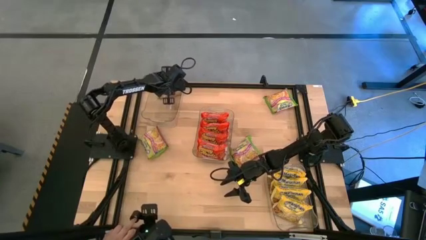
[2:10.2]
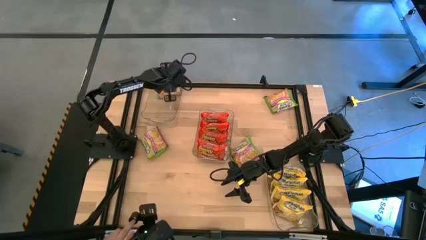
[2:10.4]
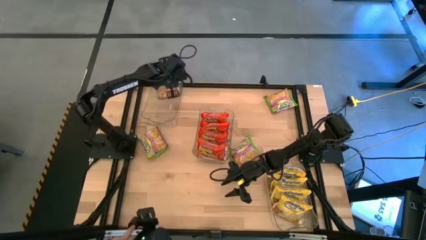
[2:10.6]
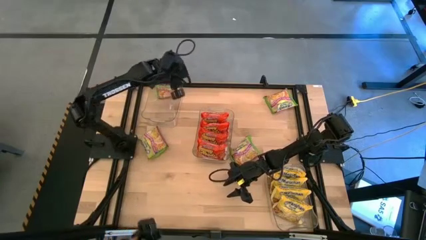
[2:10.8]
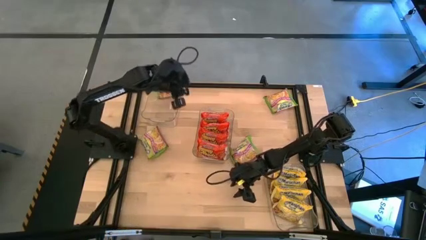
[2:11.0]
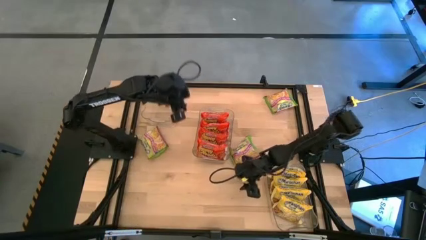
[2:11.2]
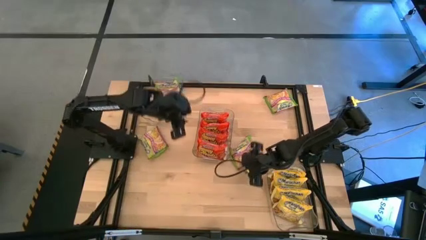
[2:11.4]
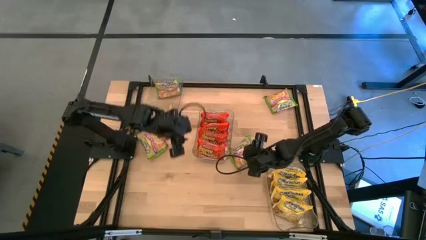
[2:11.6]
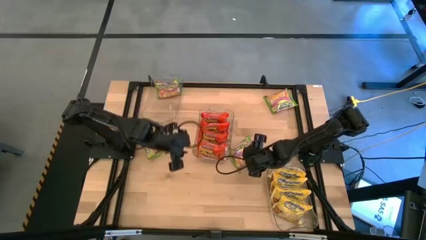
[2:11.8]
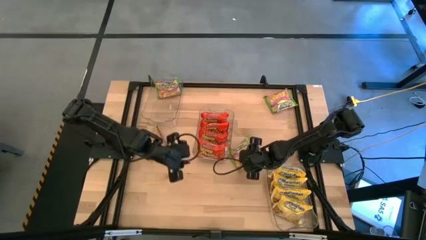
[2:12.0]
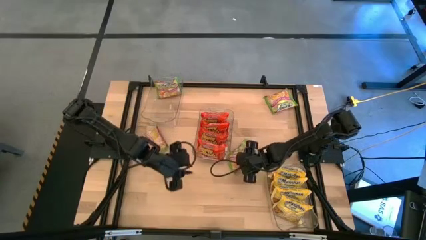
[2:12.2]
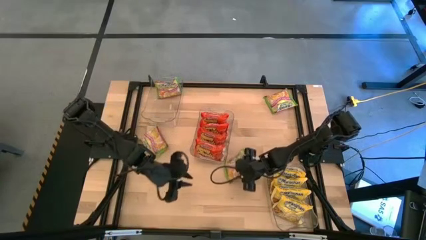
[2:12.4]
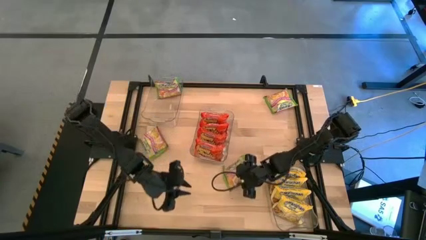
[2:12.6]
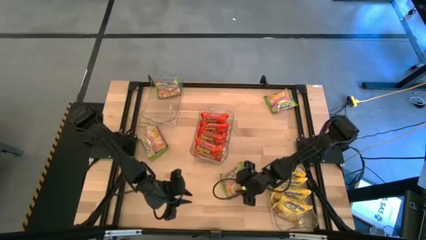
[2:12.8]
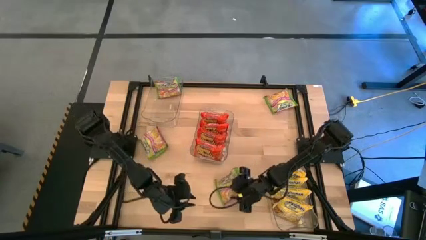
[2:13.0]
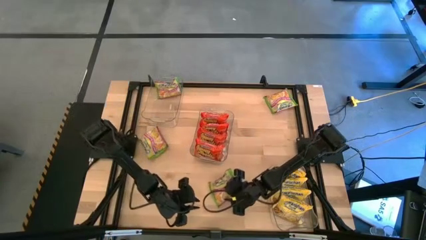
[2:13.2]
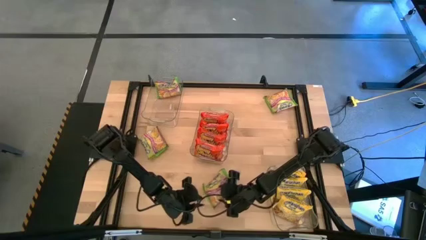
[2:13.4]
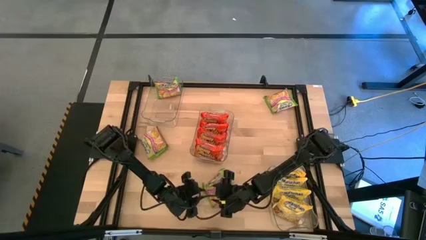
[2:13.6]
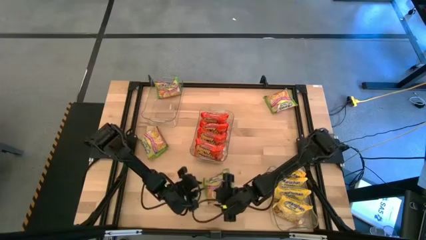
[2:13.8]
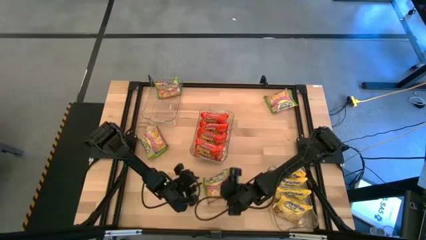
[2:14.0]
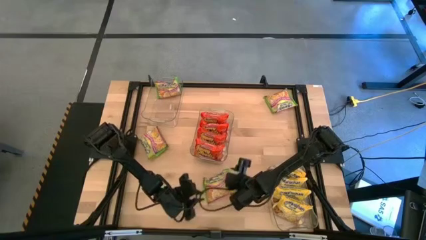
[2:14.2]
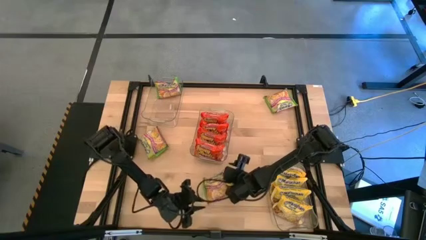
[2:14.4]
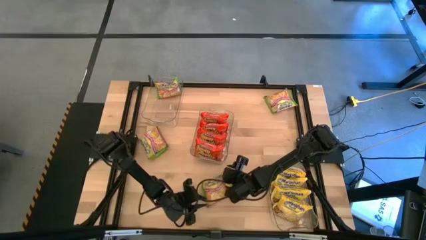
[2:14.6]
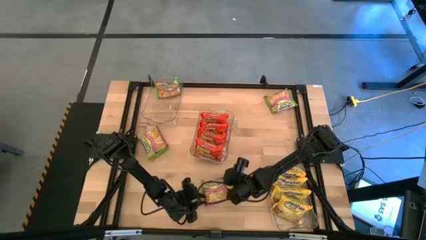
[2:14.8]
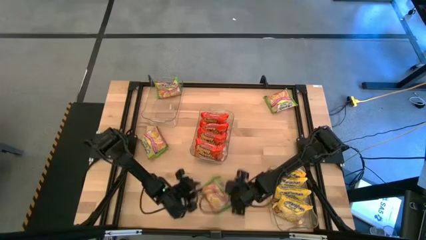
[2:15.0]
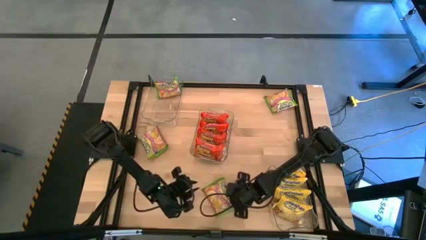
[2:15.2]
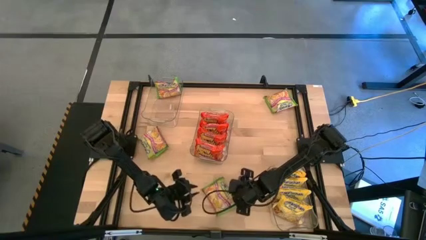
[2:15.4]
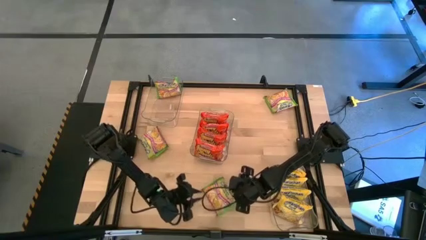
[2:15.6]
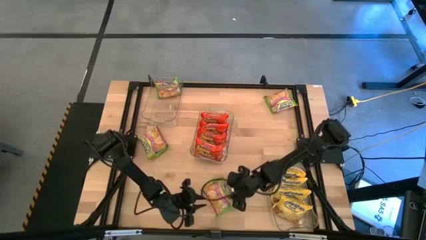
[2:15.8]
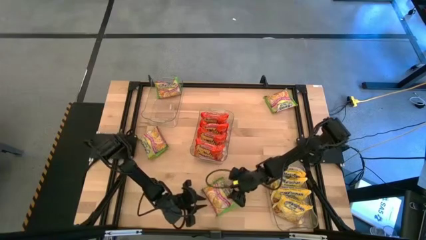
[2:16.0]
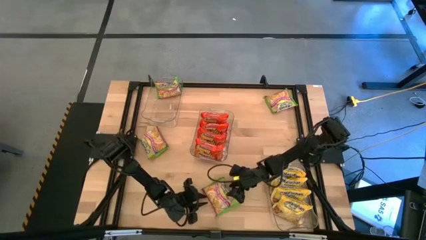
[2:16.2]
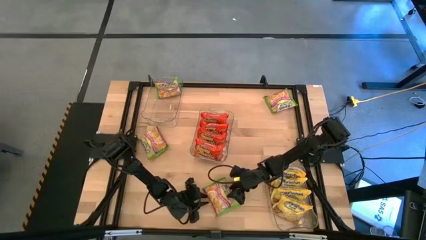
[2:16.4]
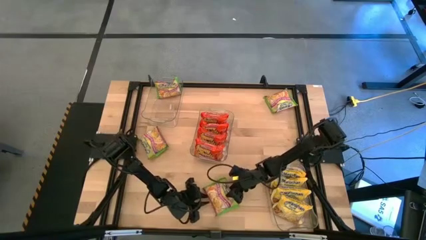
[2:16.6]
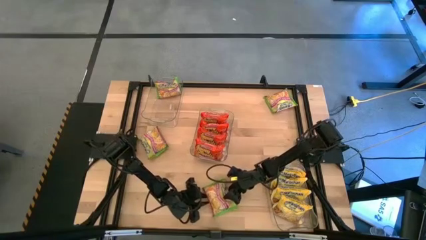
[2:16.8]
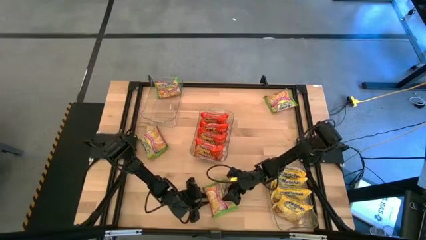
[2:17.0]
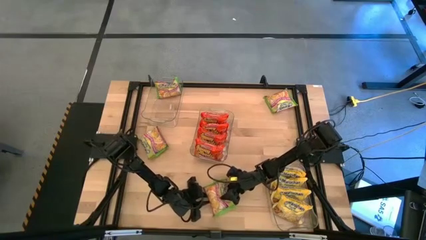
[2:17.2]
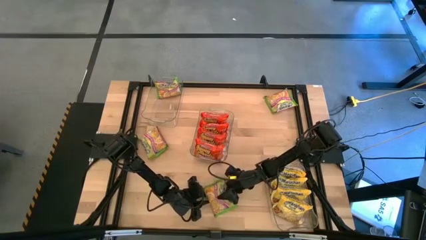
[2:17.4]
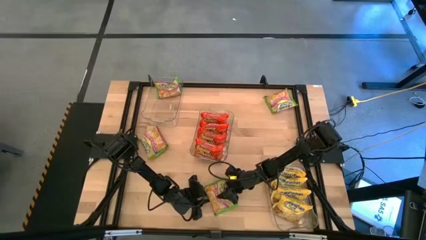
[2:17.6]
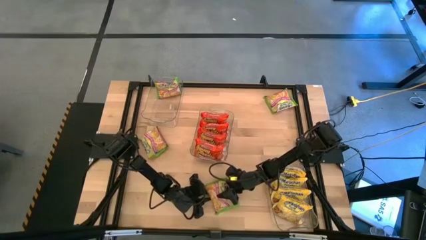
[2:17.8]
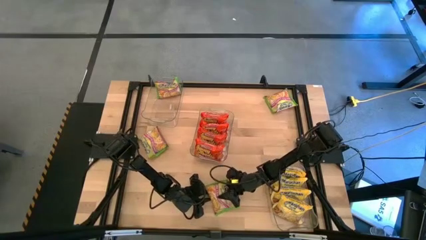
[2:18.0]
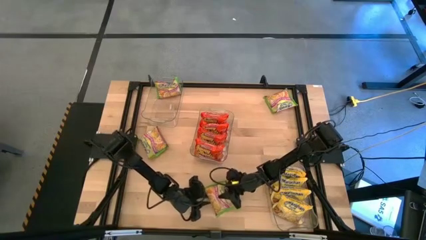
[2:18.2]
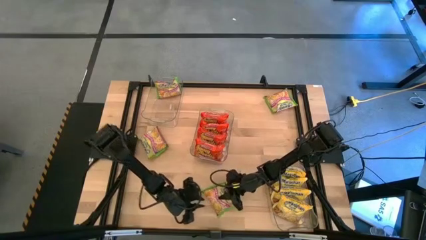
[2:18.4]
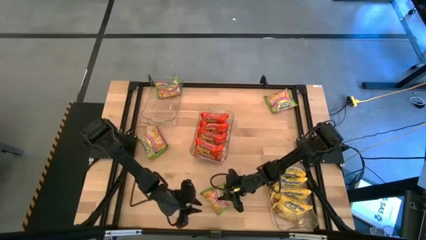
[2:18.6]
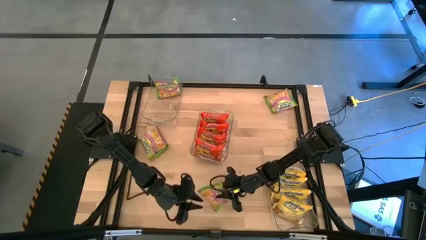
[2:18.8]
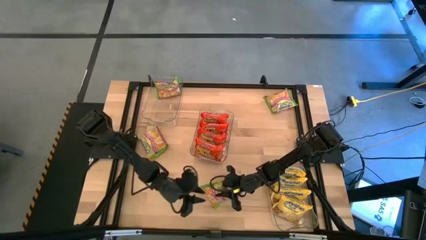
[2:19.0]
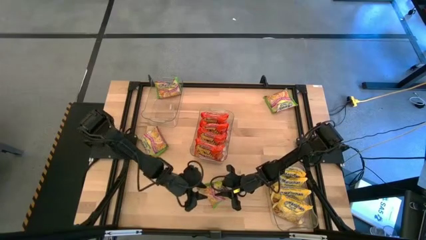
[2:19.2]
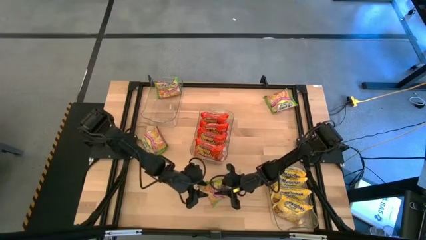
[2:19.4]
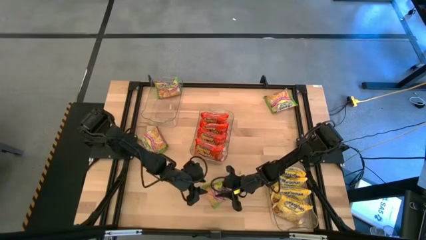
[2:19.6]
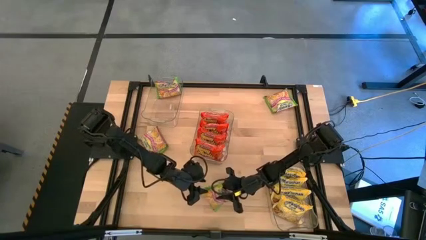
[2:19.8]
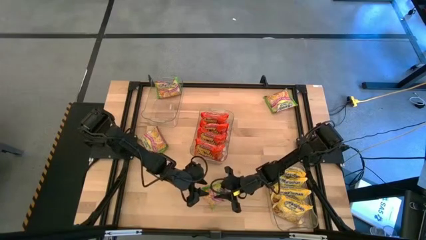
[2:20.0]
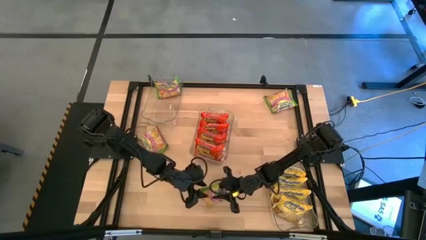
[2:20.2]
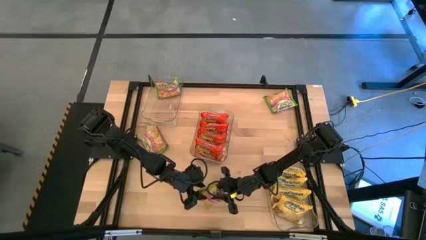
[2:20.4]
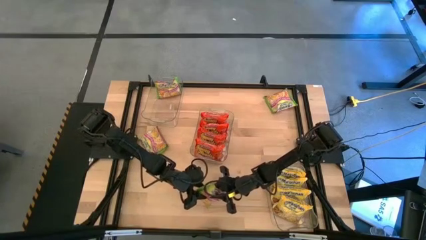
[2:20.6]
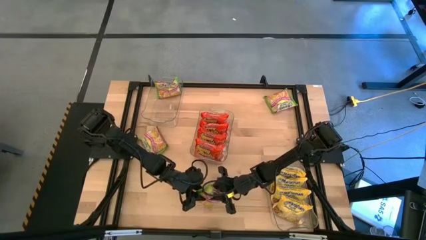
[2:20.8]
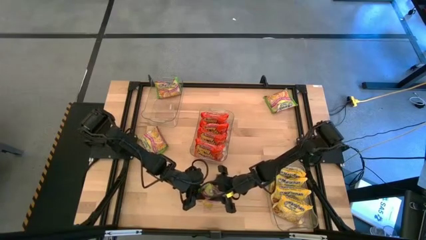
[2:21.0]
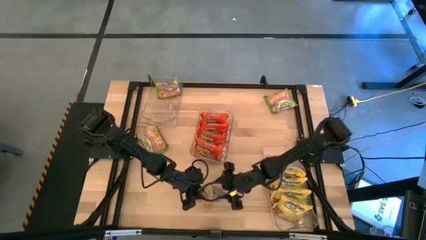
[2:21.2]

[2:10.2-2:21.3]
Task: Sort Maruchan noodles
Put the bottom green noodle pack into the top transparent bin

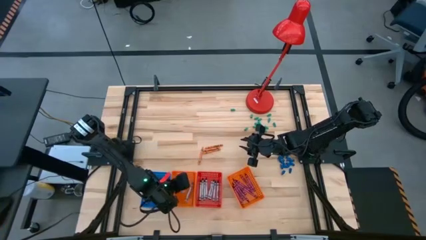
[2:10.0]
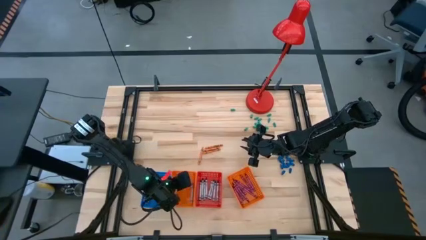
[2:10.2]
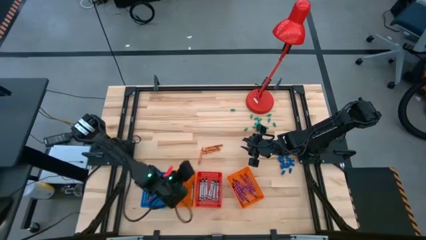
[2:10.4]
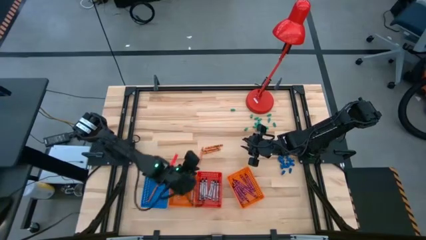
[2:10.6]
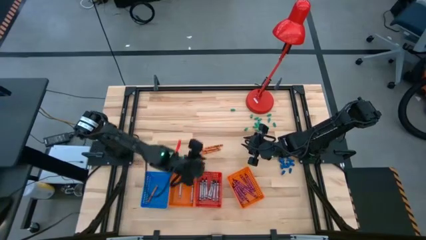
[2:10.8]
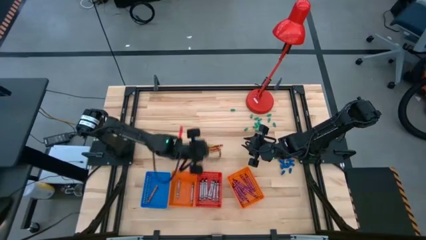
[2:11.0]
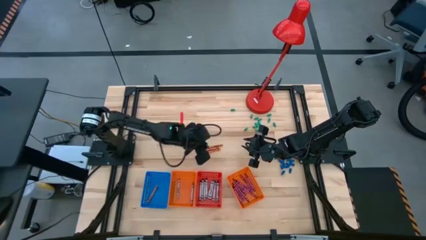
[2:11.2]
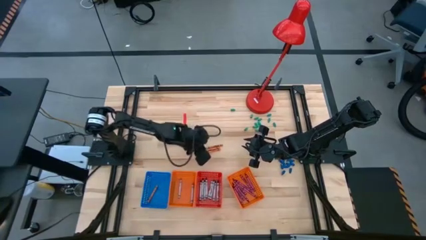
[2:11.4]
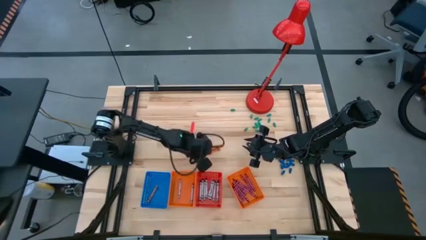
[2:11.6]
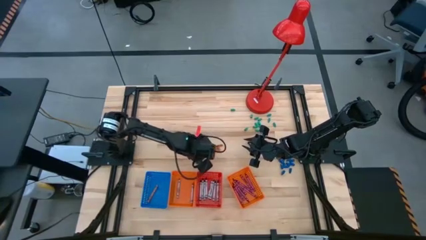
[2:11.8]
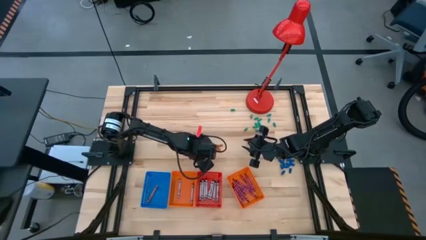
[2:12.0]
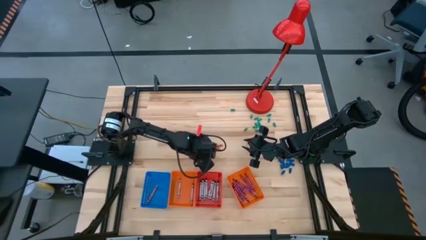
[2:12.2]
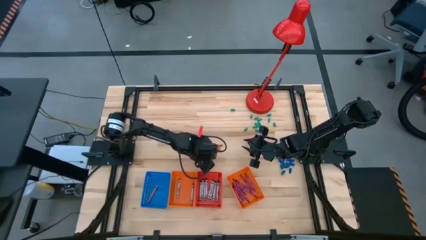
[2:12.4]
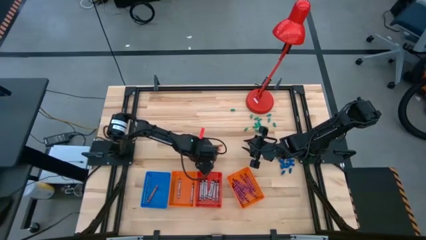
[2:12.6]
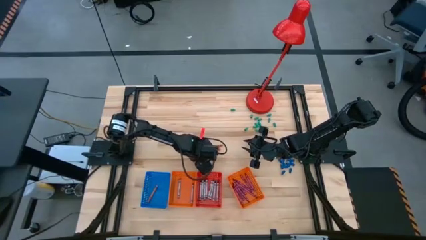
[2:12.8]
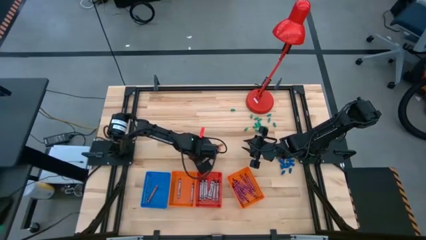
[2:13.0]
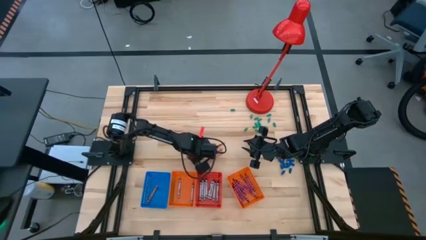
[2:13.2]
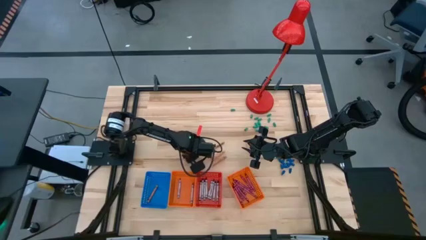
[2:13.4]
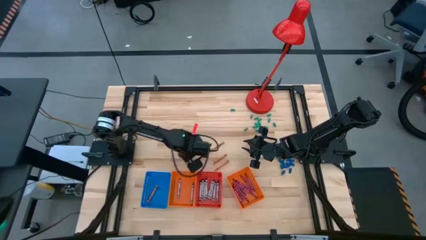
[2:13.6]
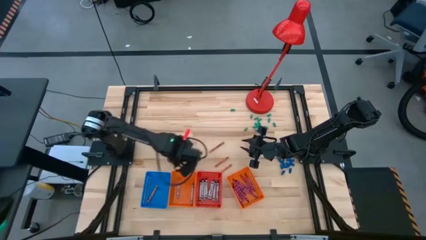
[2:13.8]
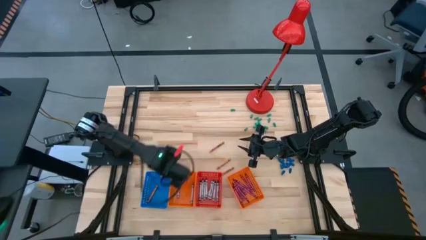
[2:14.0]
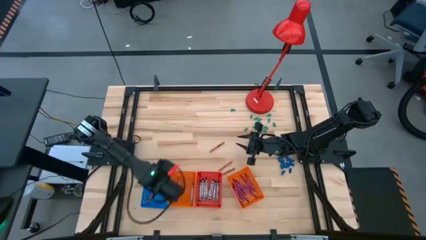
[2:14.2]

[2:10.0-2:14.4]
Task: Sort crayons
Put the orange crayon into the blue bin

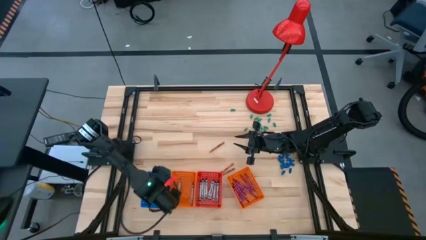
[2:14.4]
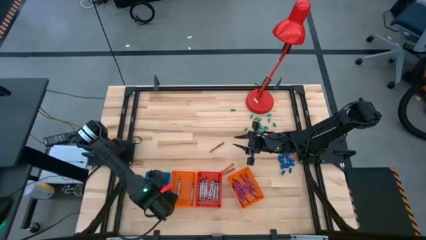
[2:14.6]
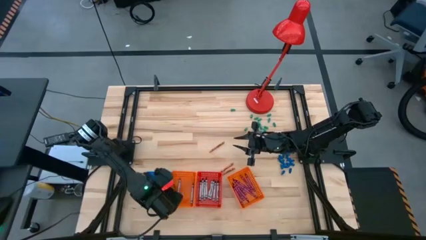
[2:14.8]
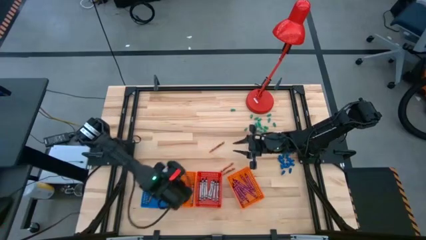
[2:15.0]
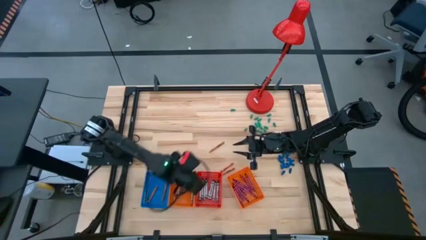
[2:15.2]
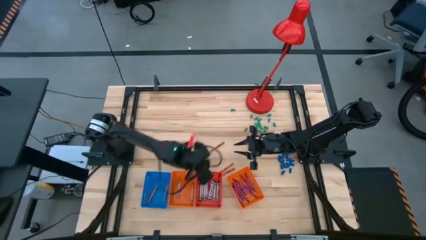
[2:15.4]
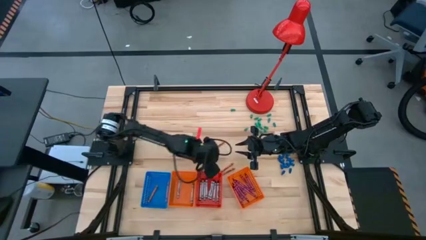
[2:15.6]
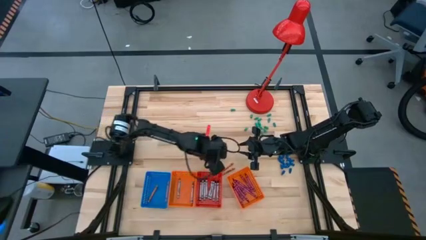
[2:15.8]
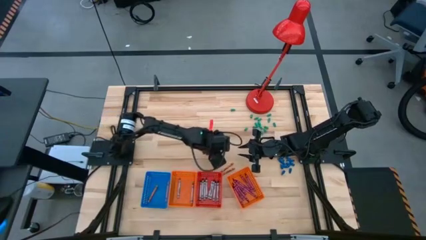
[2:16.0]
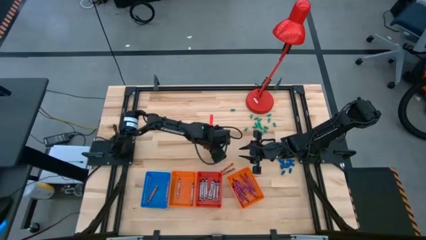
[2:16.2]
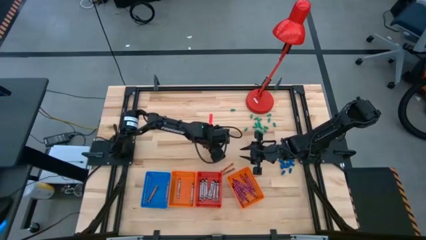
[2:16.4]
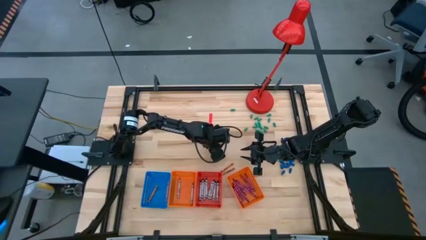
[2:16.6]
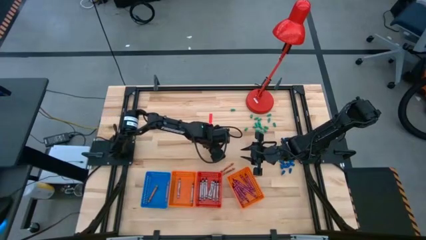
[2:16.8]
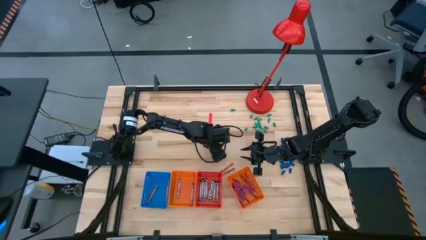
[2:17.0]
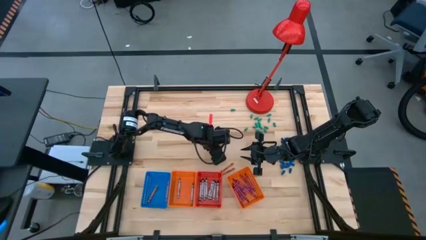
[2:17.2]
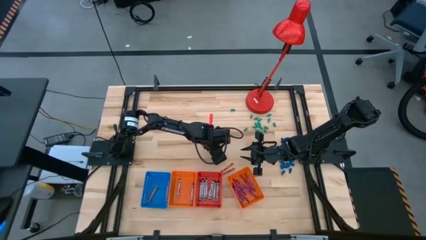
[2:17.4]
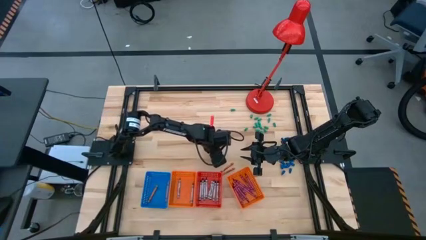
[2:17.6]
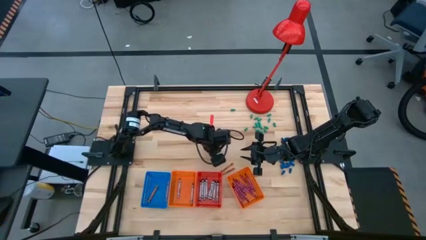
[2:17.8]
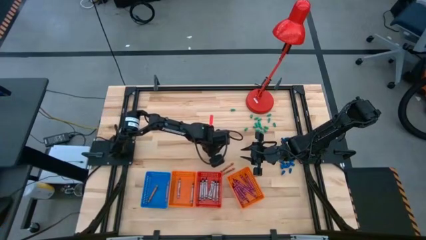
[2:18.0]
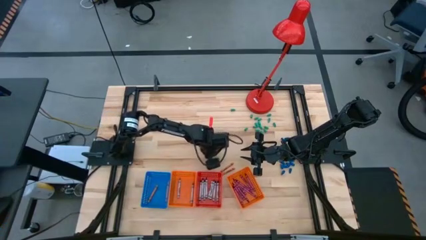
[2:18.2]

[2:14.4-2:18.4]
Put the orange crayon into the blue bin
